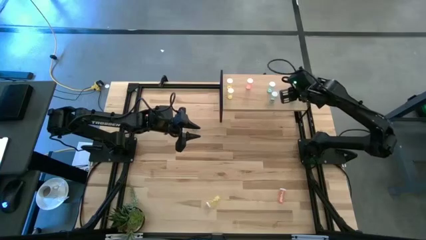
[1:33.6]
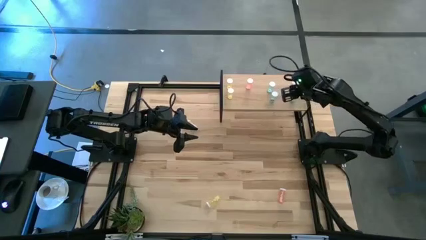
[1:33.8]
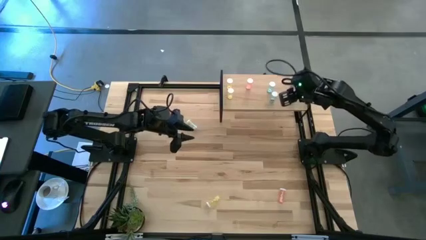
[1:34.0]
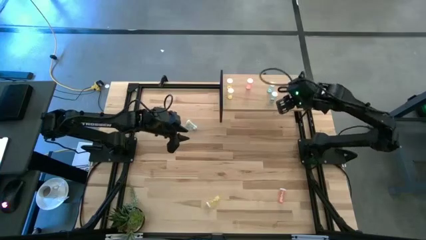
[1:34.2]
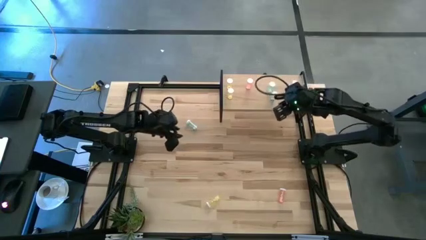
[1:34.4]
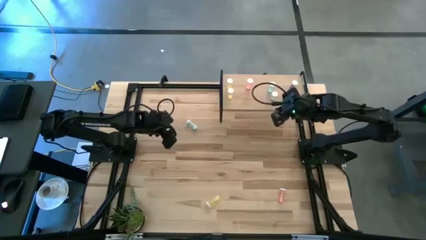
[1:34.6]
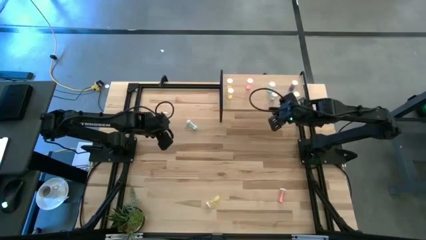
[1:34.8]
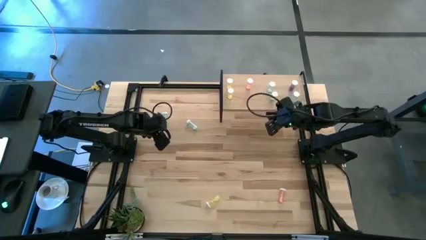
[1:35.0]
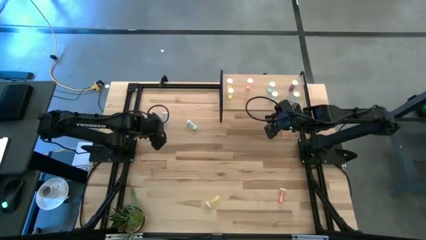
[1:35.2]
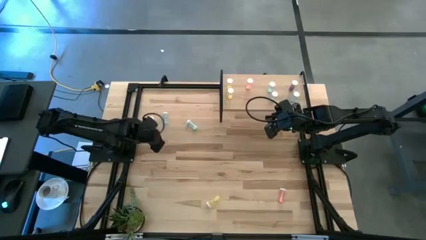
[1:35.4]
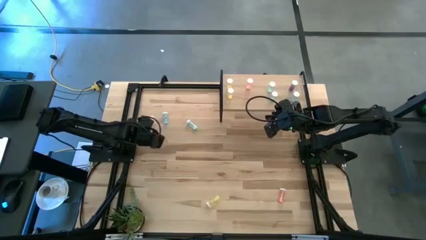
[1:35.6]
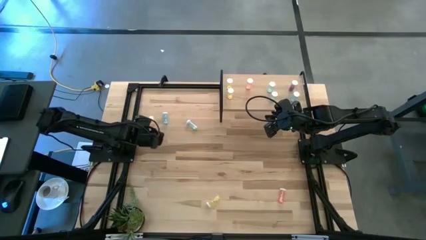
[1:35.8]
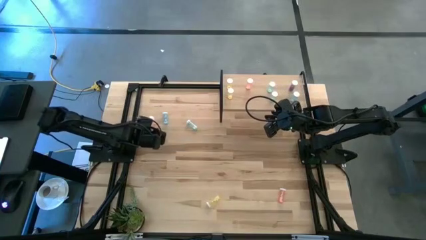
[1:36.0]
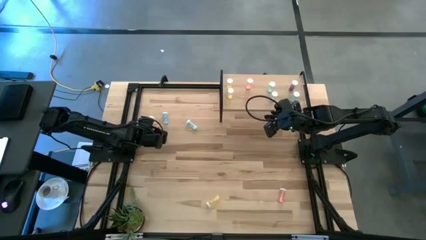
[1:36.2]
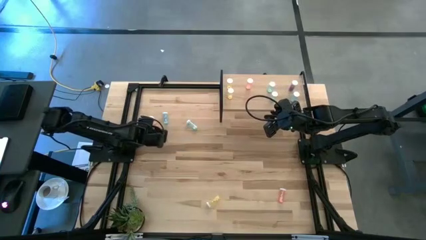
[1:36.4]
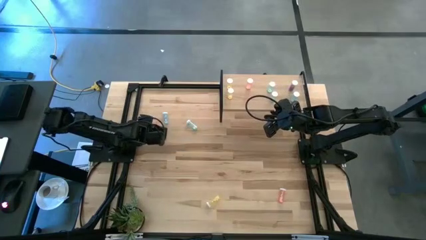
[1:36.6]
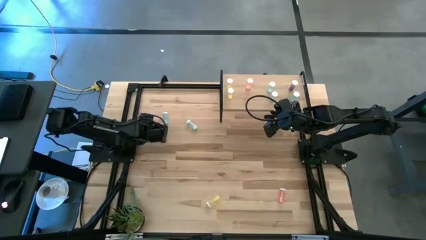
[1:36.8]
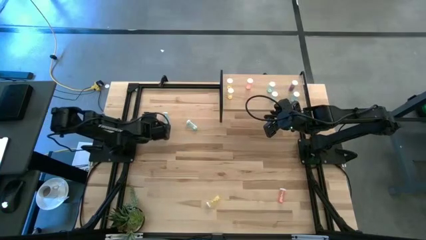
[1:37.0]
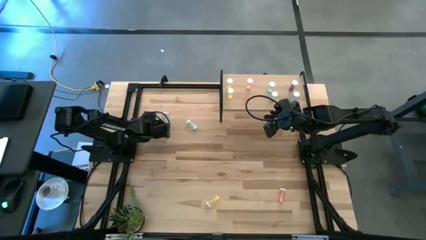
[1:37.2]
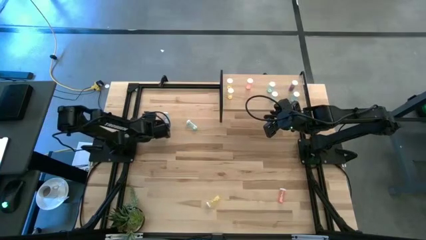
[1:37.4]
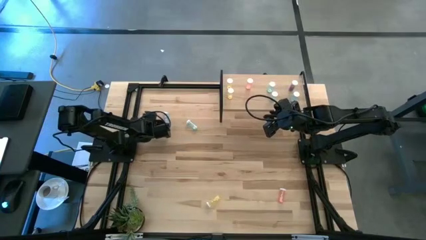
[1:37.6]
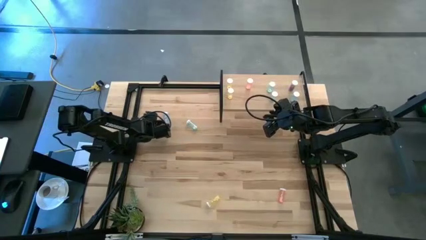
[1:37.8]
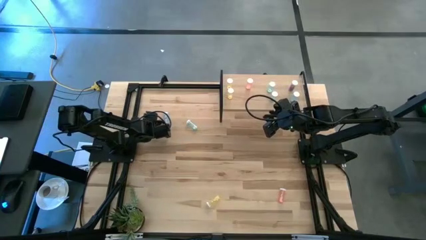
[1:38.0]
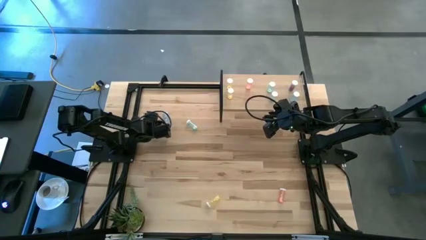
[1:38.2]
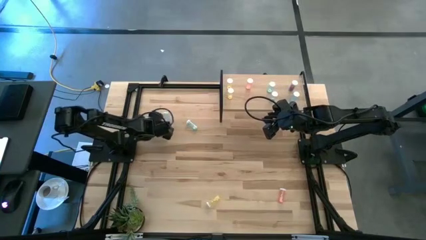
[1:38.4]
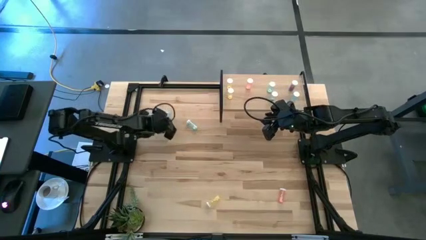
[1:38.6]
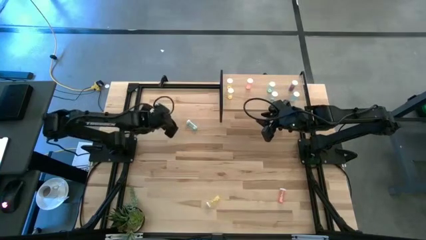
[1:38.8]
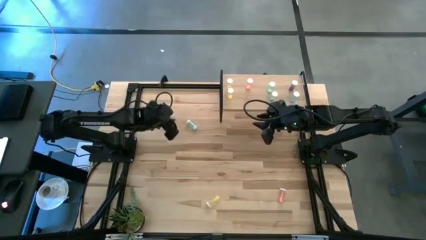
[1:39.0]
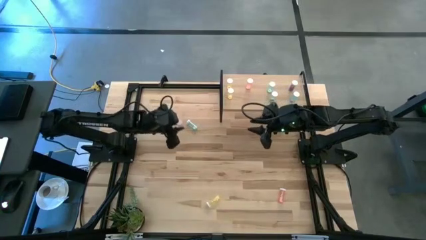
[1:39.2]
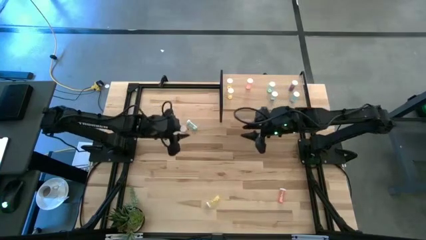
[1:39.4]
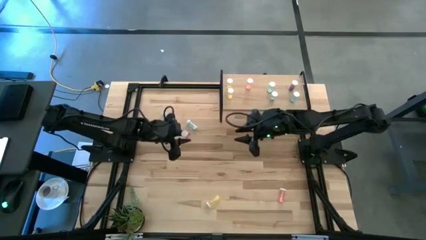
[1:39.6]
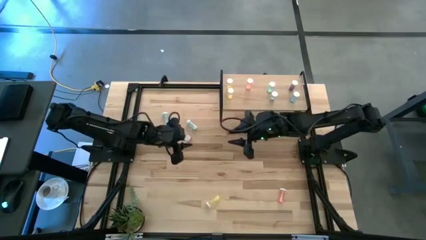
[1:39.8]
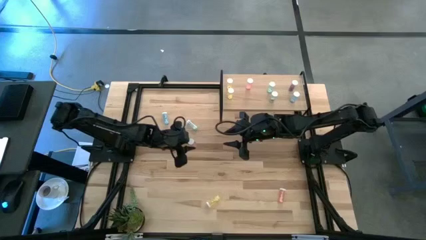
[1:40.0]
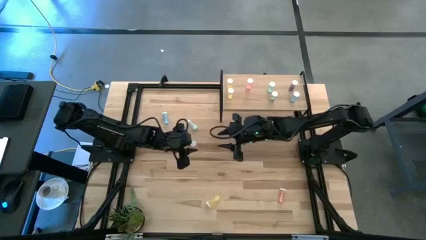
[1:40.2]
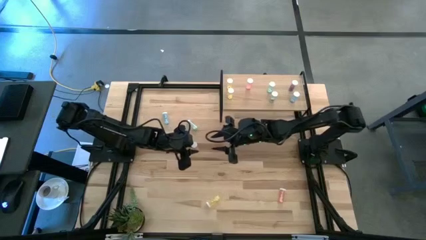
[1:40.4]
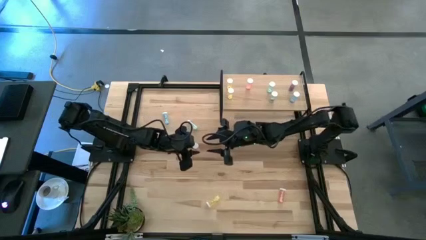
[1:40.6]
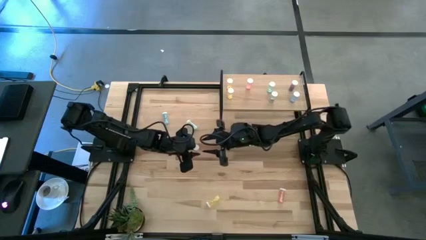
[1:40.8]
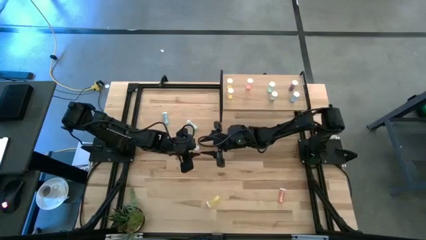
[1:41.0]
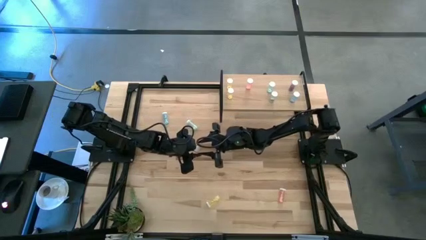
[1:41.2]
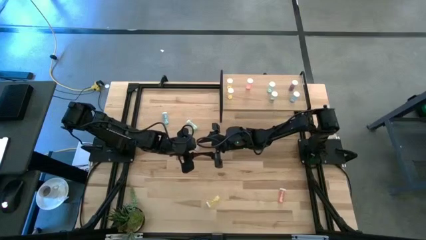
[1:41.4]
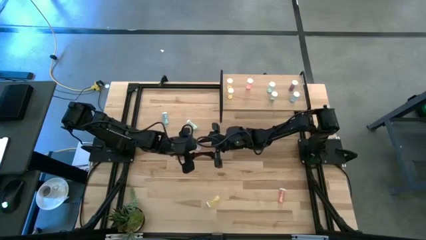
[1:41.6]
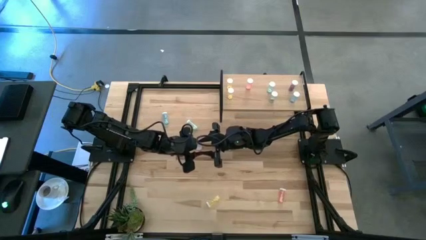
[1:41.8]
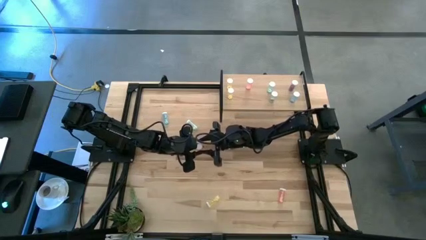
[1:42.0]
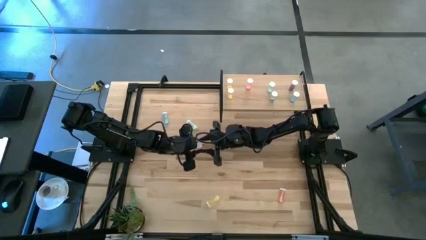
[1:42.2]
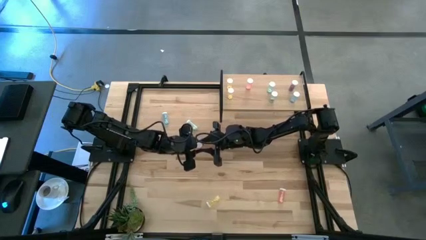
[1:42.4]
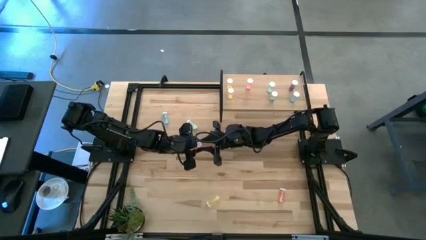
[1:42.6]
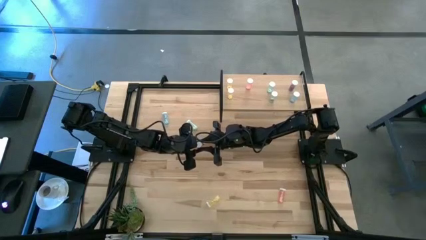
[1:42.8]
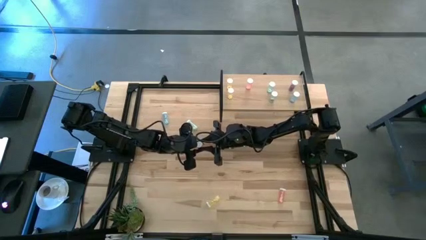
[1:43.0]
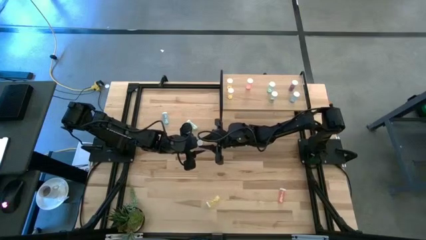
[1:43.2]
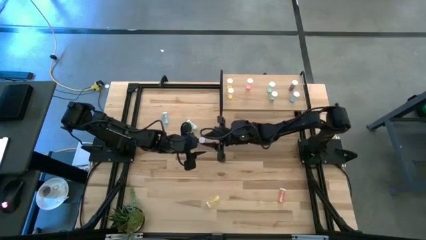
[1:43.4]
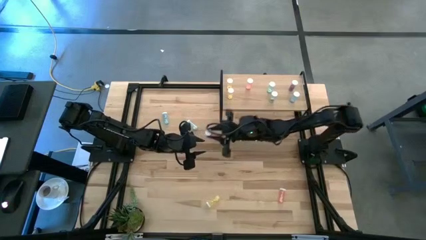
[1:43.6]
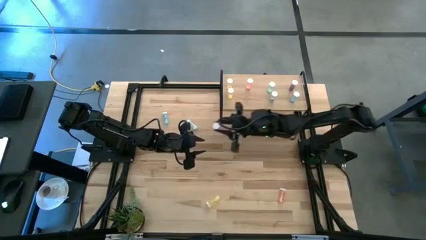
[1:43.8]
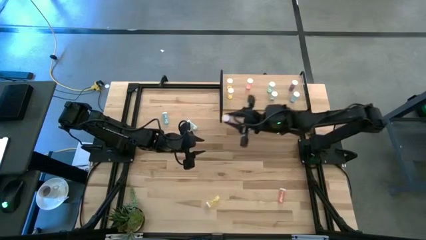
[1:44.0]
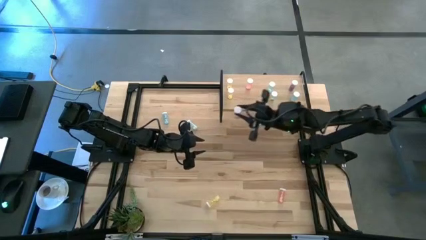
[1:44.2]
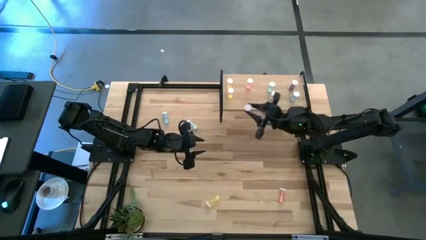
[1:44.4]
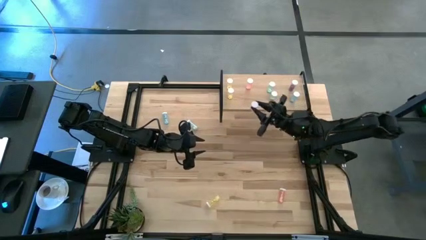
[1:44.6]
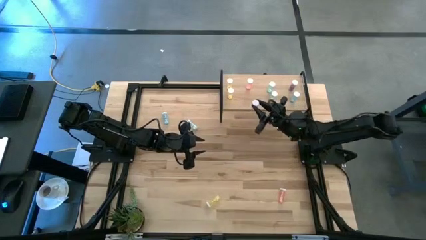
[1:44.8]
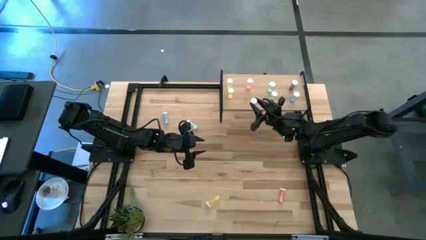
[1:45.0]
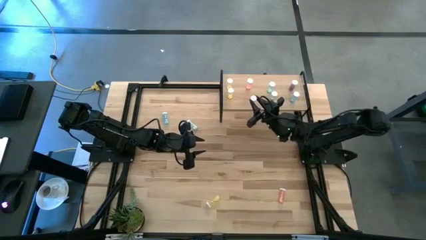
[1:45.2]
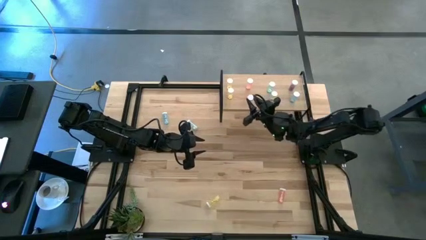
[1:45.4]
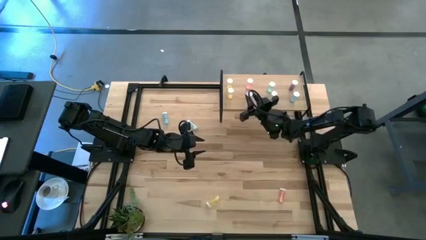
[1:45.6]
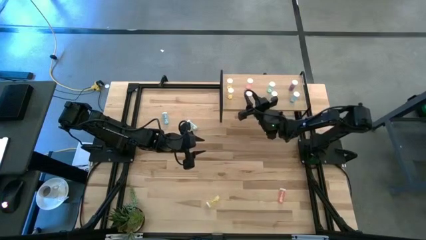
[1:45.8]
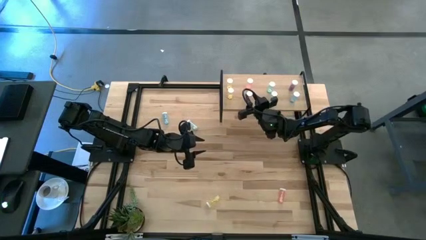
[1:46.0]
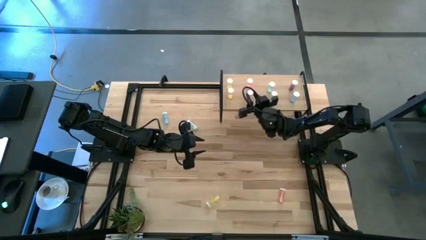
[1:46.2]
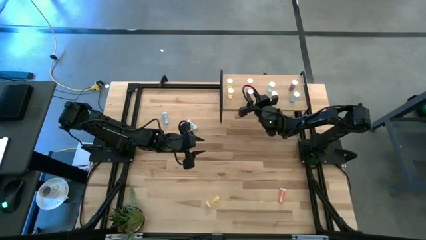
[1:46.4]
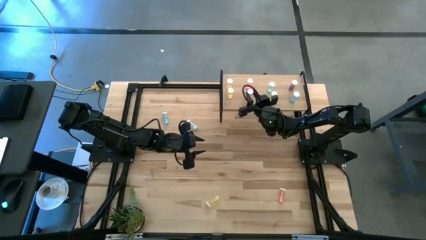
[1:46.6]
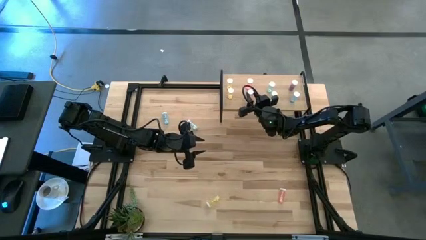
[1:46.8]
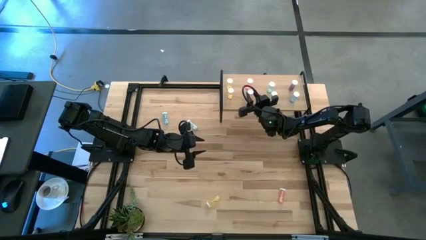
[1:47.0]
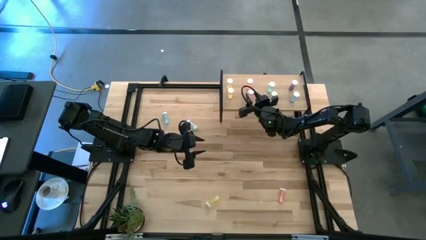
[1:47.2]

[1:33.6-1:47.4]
Task: Pick and place medicine bottles onto shelf by color
Put the left pink pill bottle on the shelf aligned with the other pink pill bottle

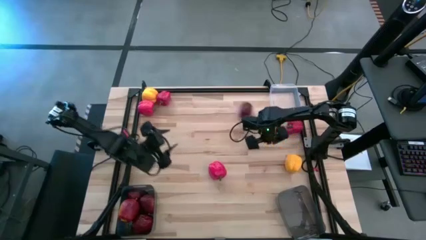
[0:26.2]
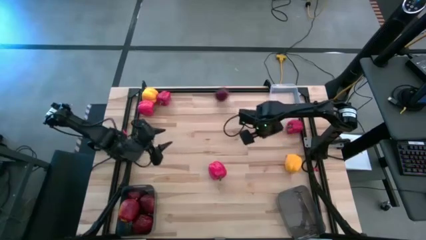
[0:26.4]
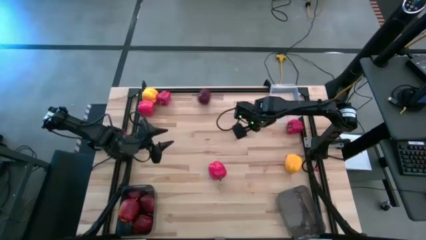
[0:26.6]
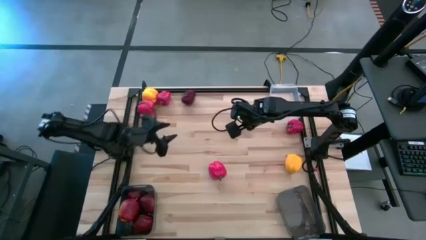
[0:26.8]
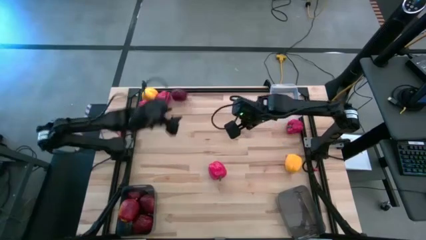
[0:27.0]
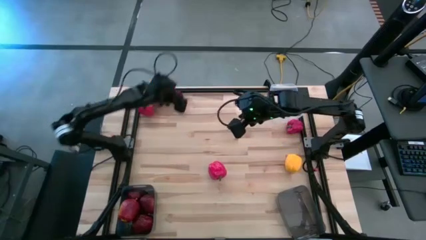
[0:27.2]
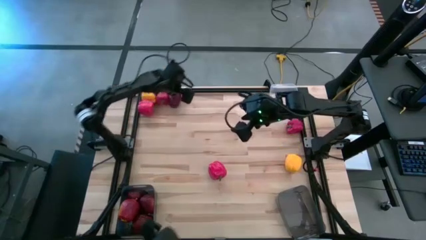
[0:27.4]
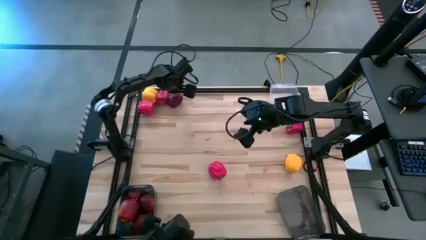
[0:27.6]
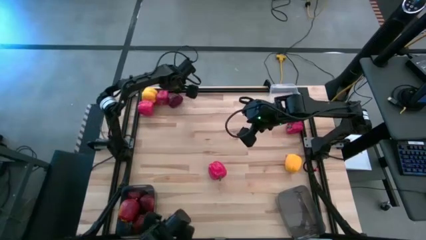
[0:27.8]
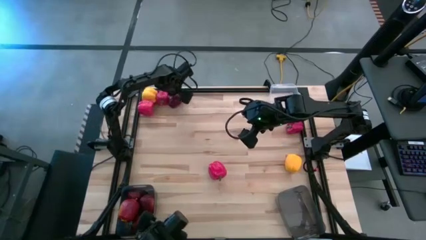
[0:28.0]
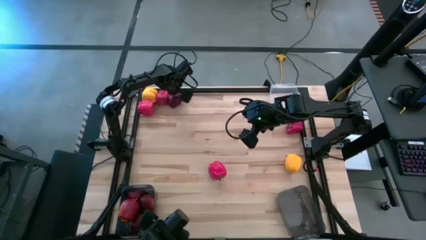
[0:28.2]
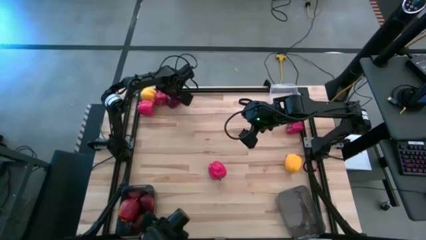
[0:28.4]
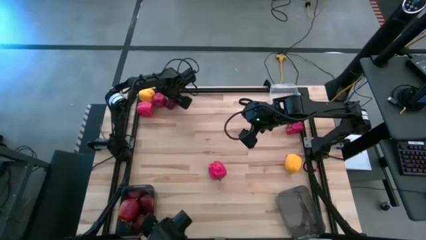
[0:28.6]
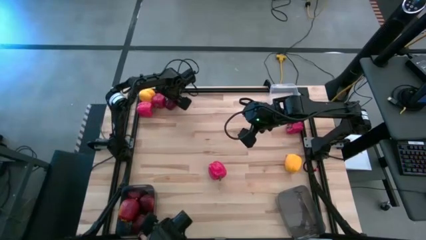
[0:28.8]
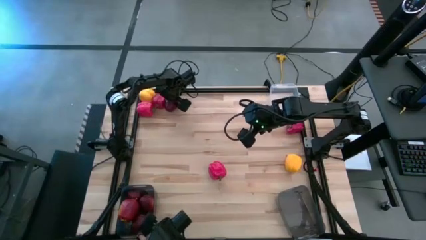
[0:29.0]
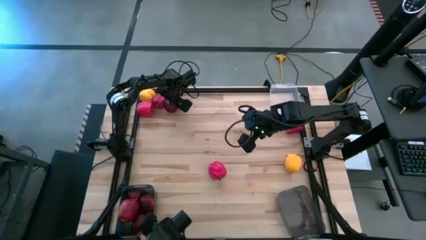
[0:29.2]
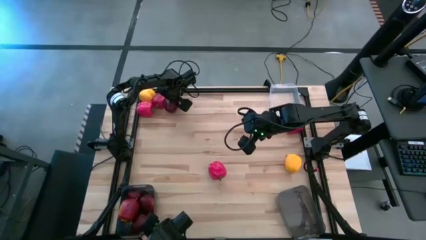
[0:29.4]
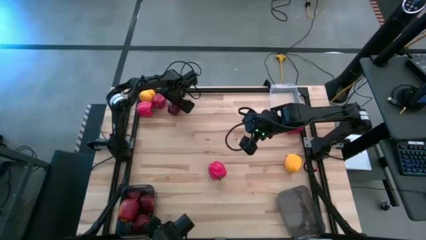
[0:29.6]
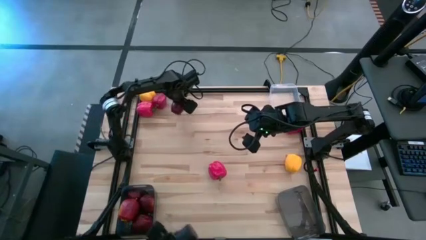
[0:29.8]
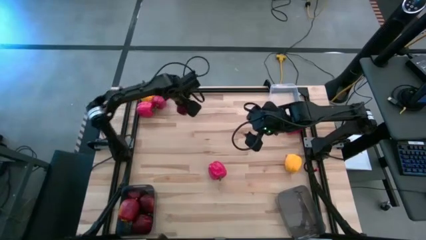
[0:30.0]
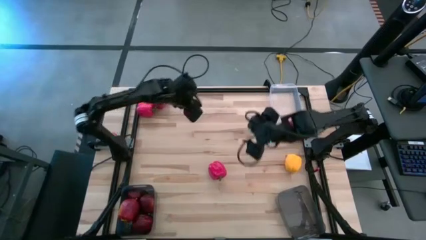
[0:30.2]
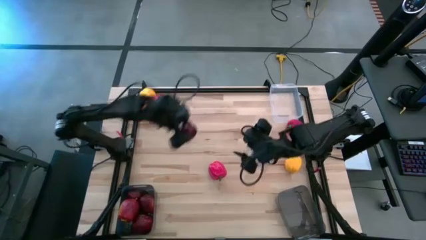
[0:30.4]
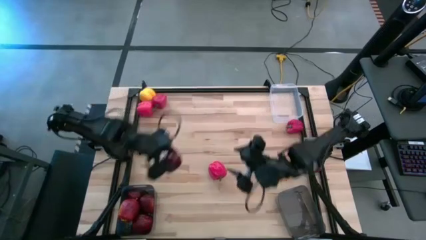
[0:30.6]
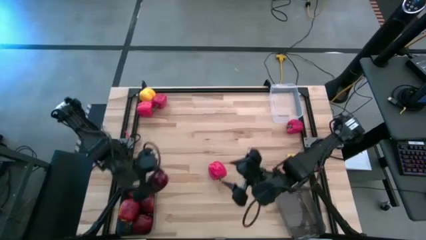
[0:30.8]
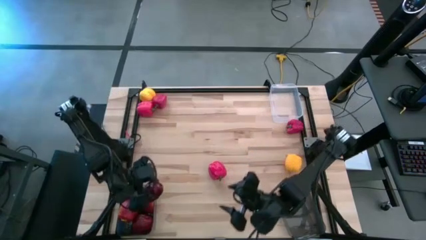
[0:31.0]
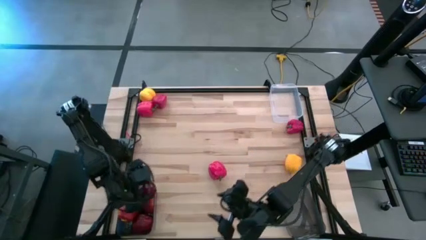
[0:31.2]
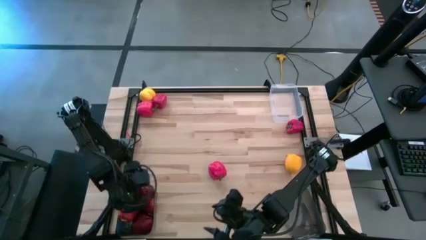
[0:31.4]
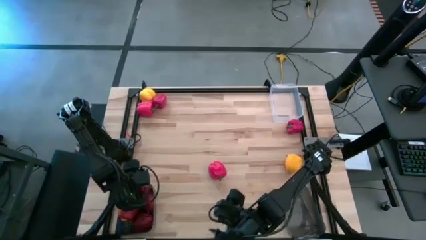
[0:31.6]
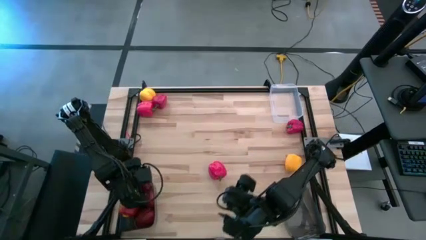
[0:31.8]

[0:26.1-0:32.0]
Task: Sort produce into baskets
Put the dark red apple into the left black bin
